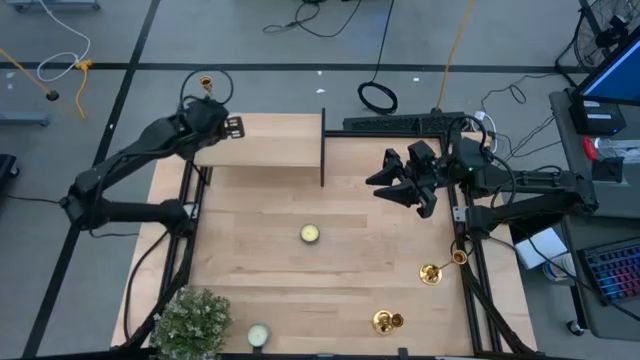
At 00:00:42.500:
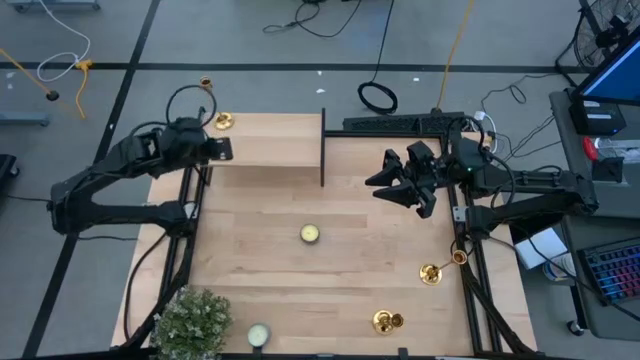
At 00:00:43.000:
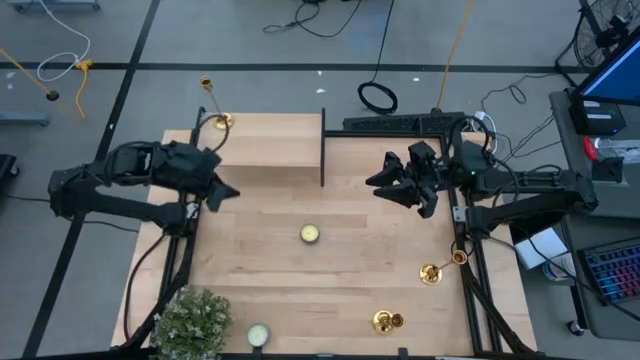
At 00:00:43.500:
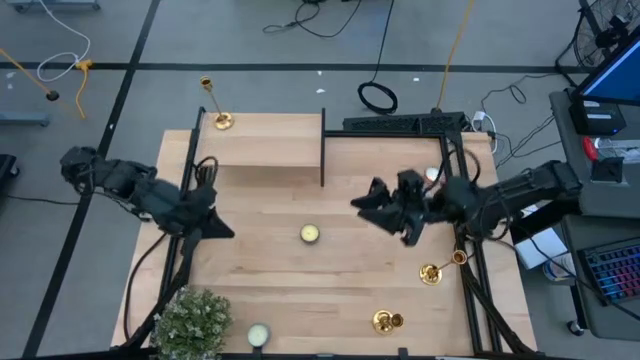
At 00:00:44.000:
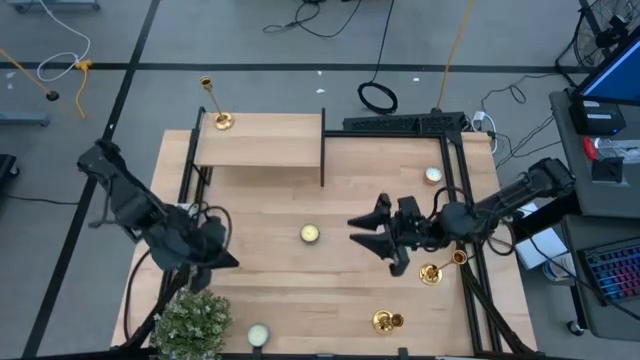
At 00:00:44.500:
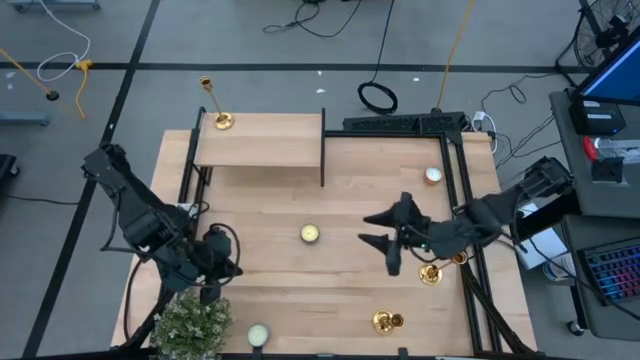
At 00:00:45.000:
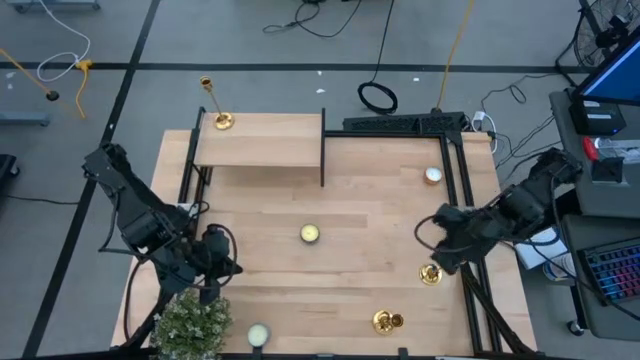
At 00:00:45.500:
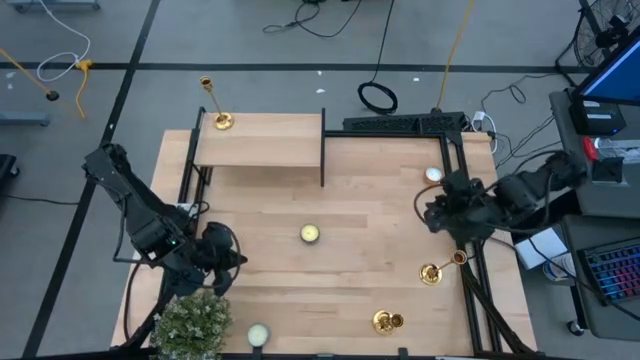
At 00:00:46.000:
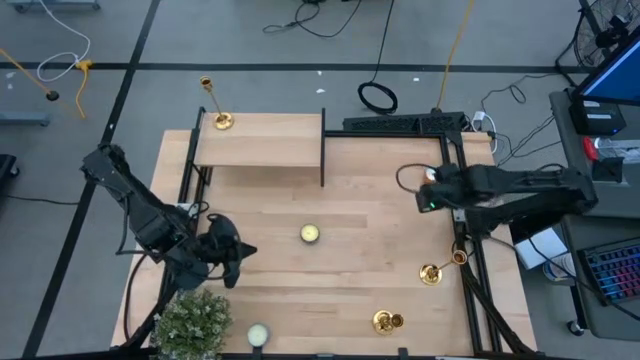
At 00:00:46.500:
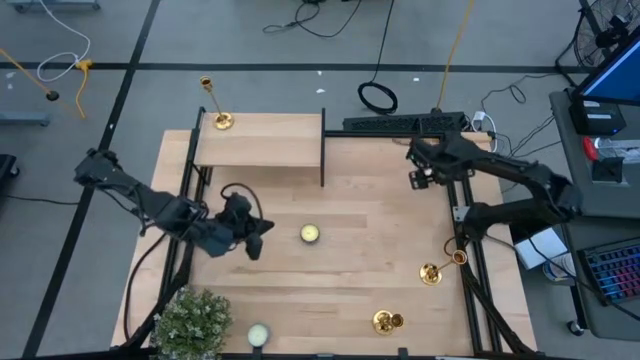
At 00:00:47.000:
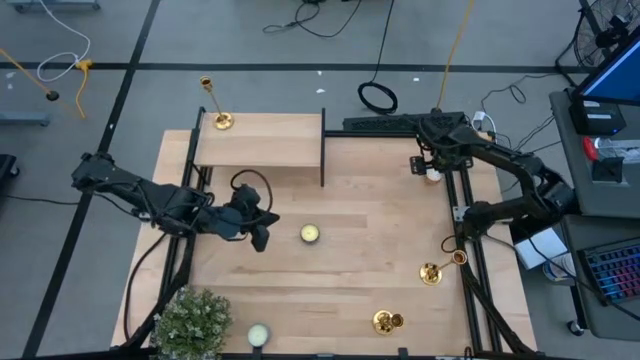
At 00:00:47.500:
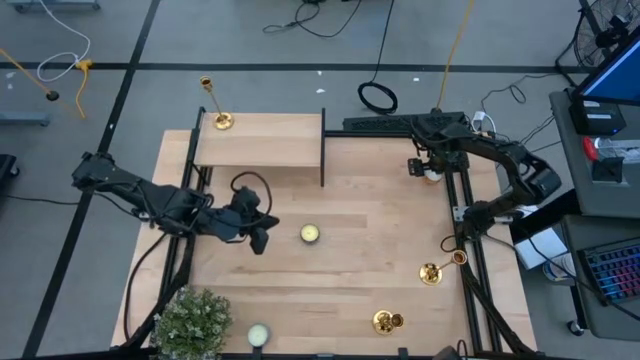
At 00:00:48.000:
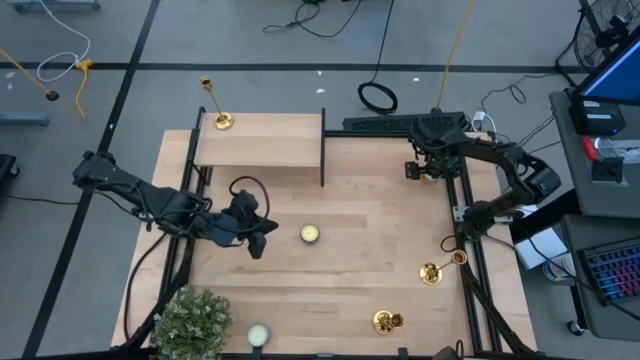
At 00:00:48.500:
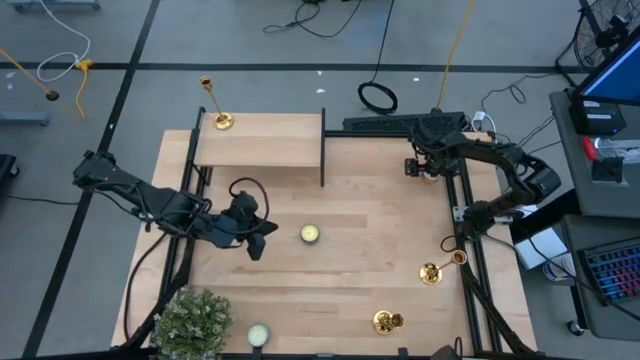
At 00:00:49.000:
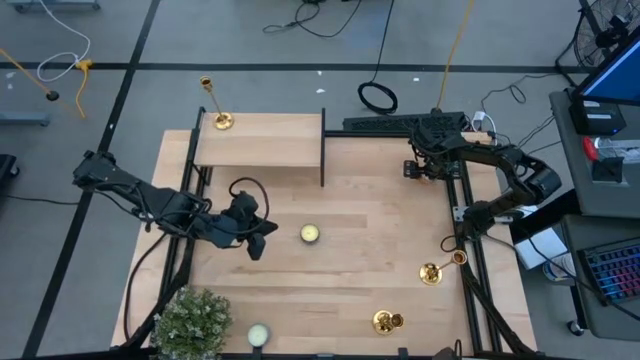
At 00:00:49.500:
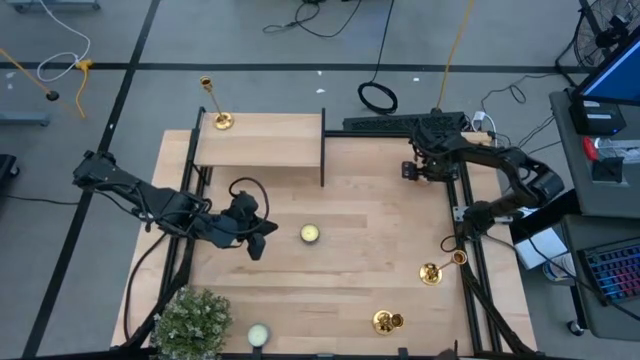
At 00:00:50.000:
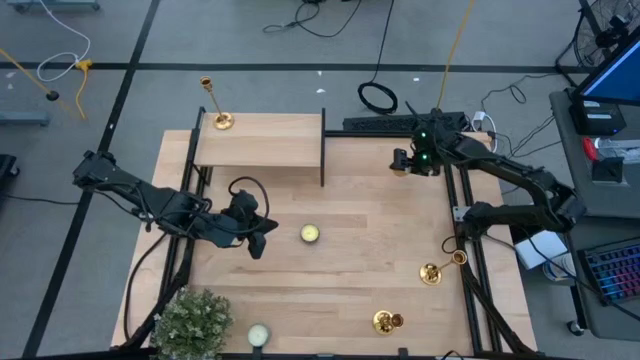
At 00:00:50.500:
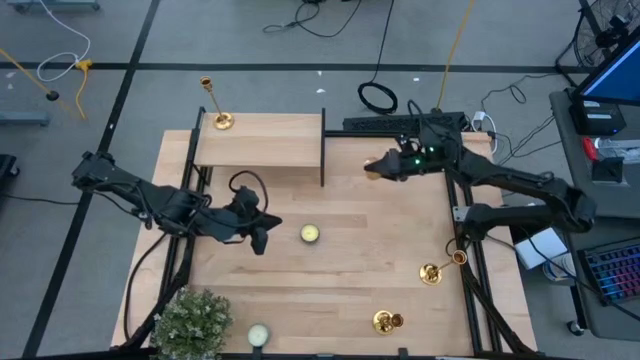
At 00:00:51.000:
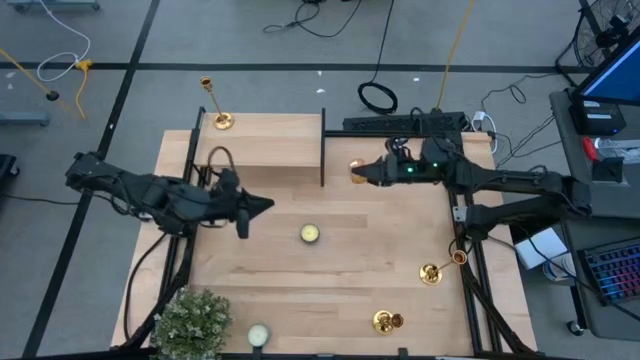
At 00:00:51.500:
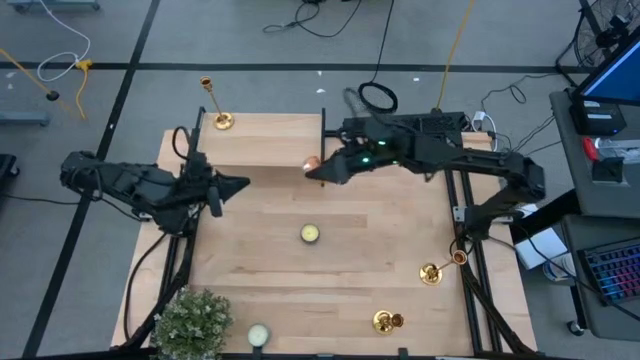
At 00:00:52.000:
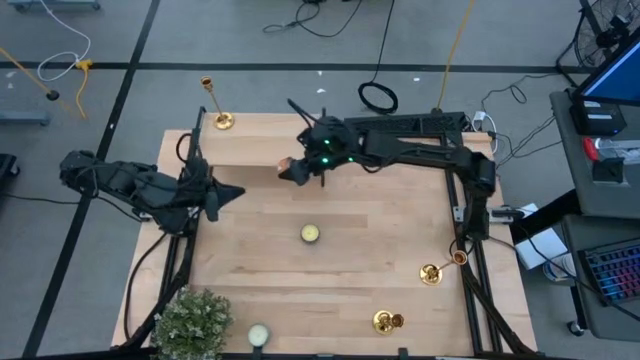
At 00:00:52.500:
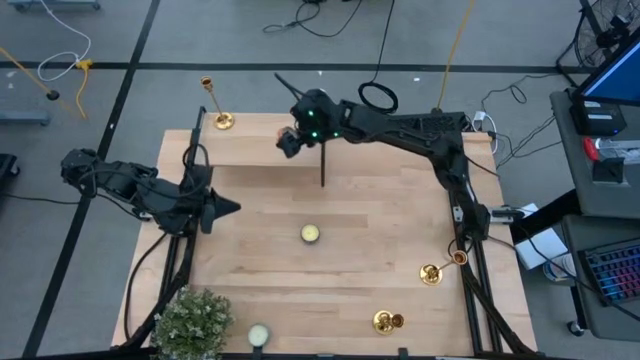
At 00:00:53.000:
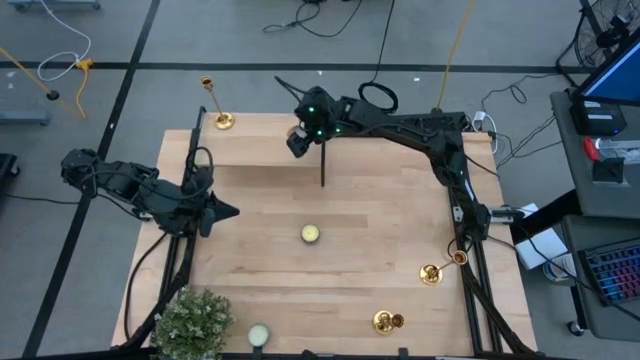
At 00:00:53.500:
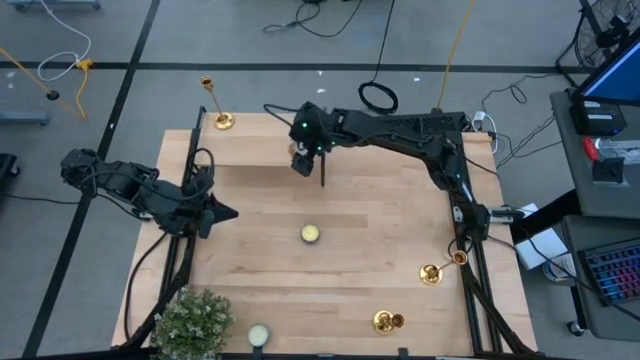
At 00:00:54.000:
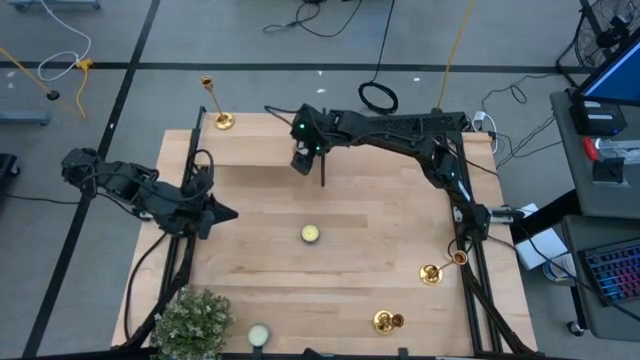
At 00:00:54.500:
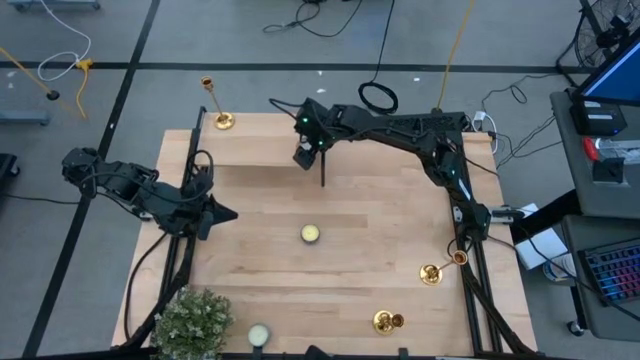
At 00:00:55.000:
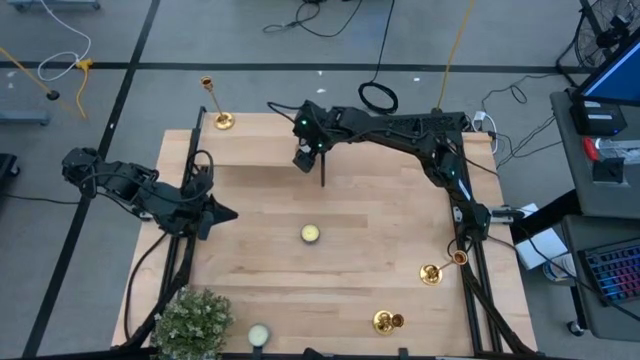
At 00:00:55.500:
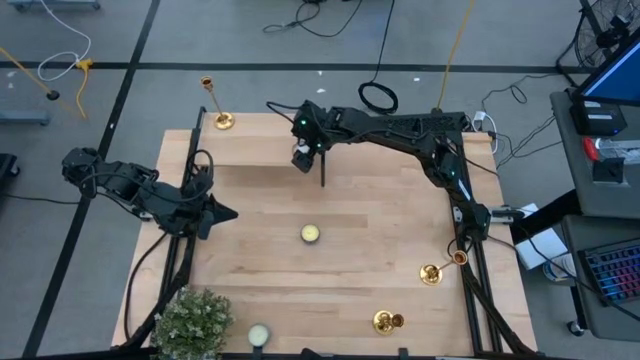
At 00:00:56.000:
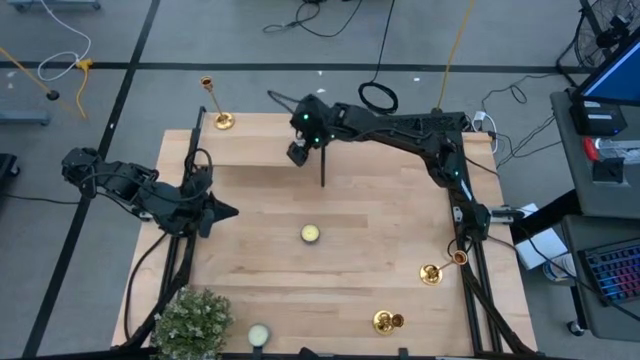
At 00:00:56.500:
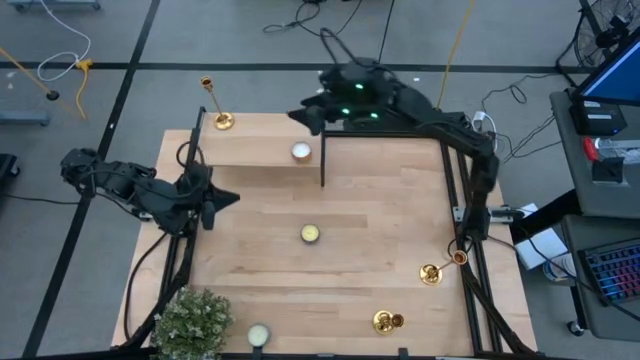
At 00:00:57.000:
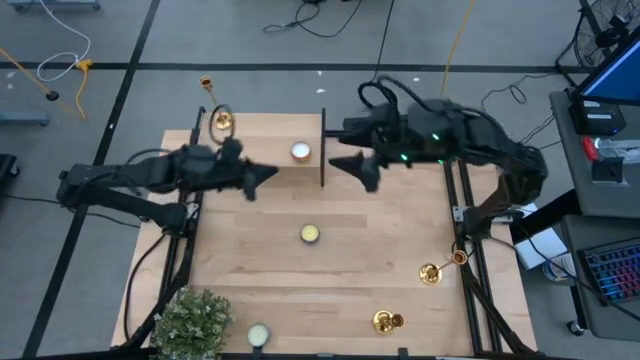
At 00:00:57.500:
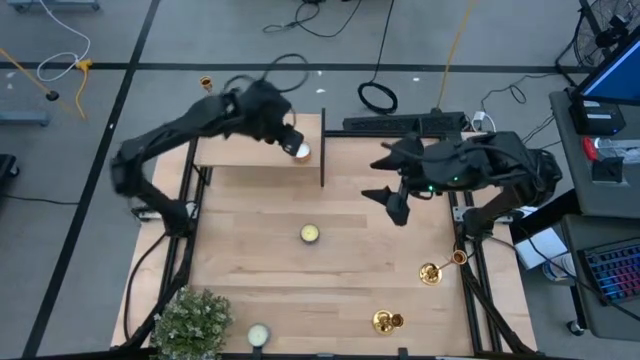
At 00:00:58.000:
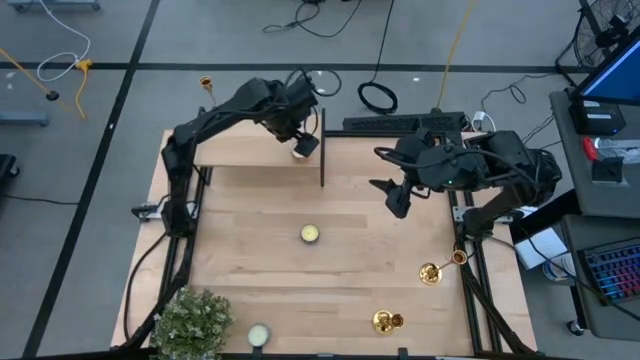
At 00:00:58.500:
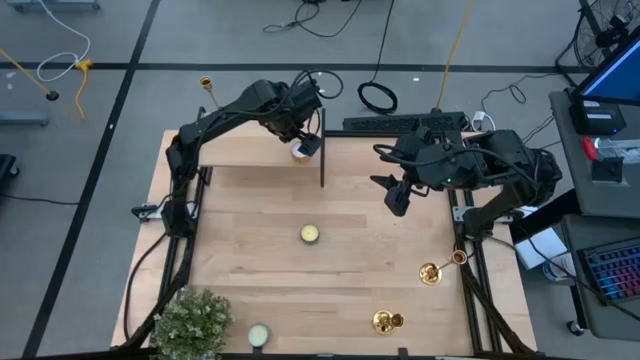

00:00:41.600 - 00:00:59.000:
Task: Pick & Place candle stick holders
Put the orange scented candle on the shelf
